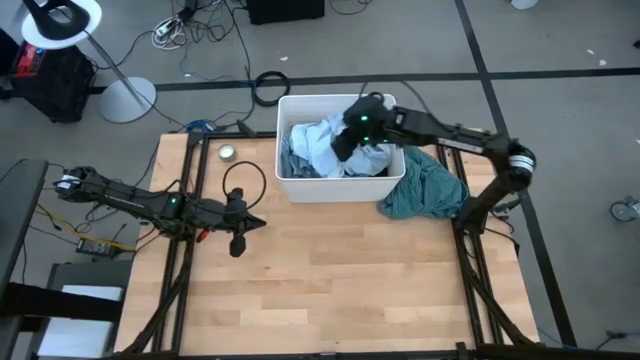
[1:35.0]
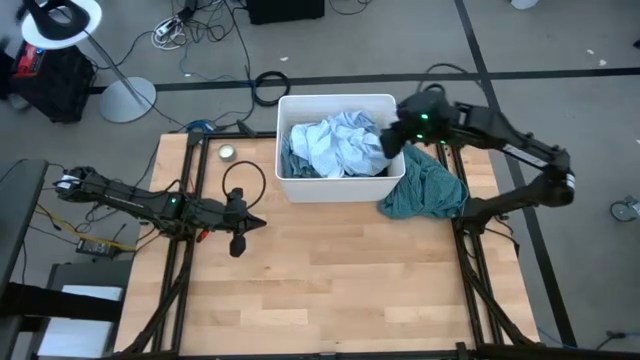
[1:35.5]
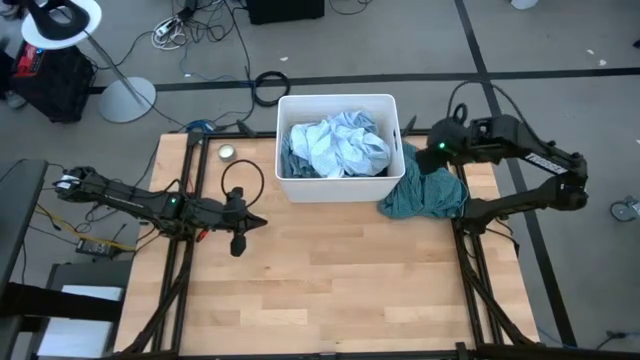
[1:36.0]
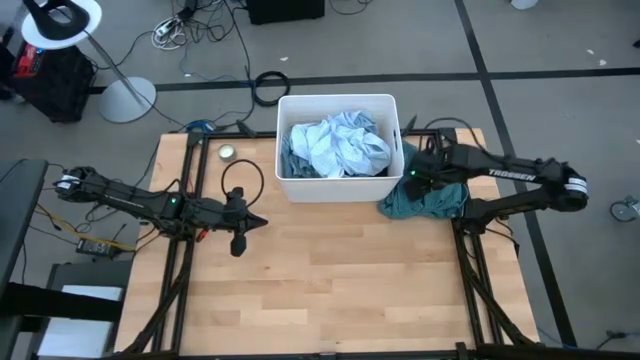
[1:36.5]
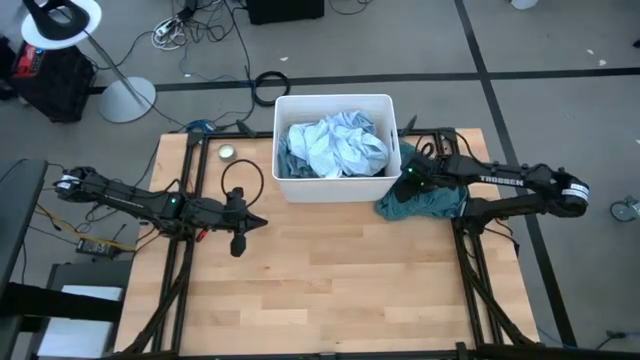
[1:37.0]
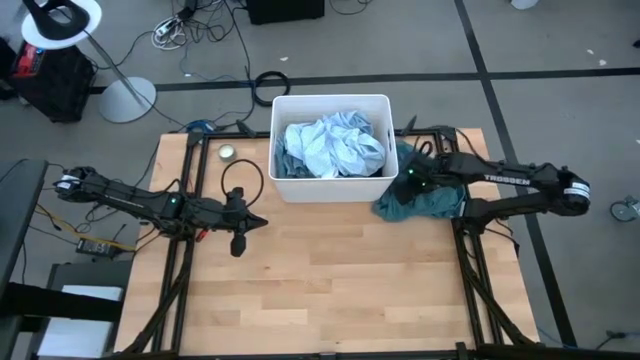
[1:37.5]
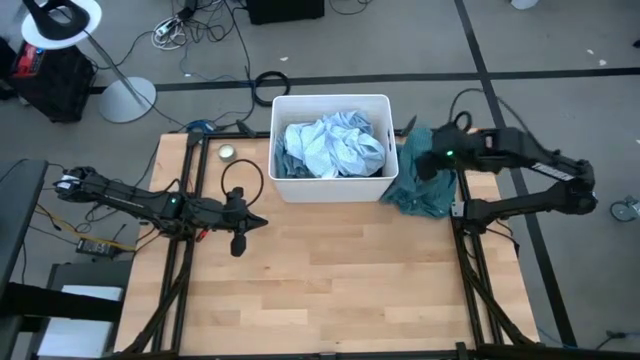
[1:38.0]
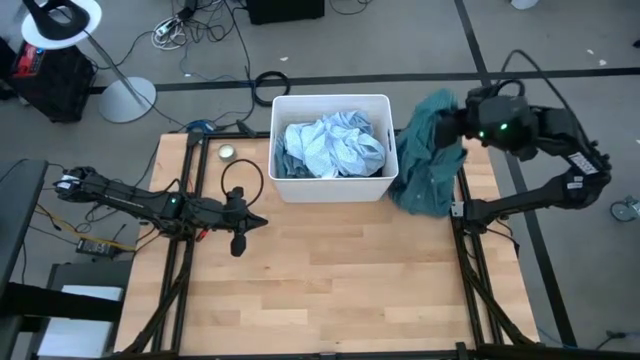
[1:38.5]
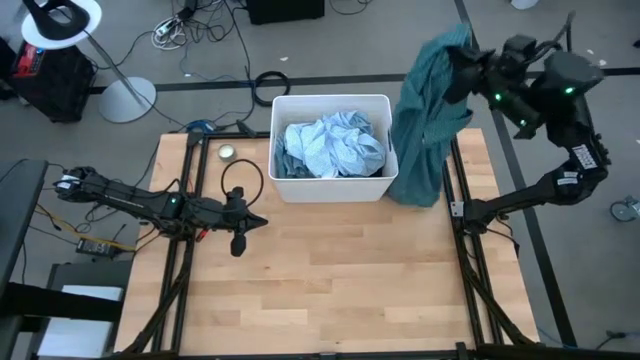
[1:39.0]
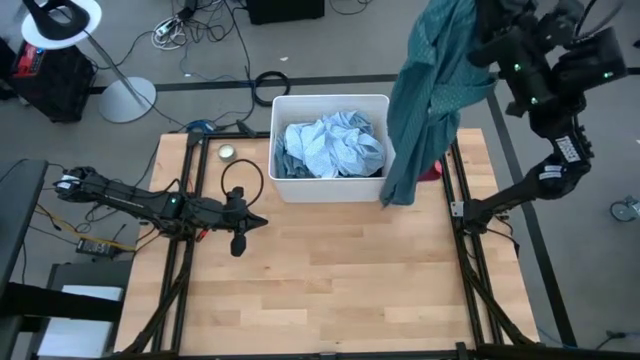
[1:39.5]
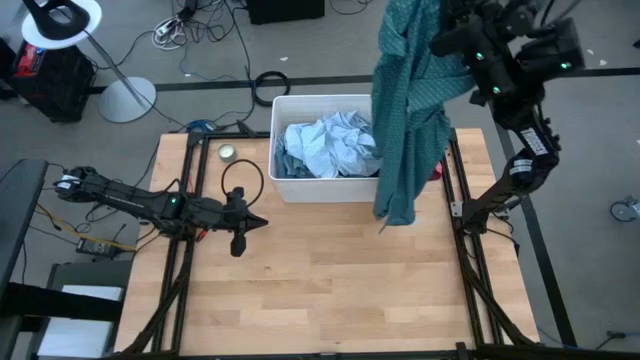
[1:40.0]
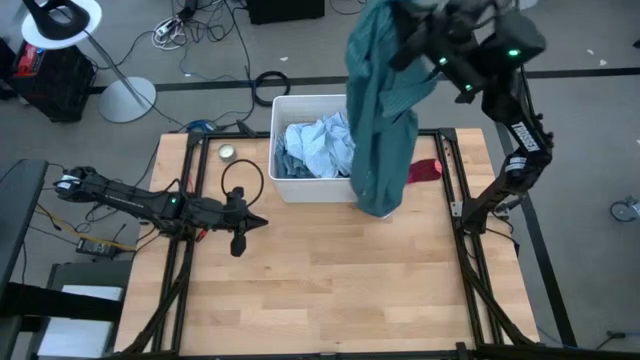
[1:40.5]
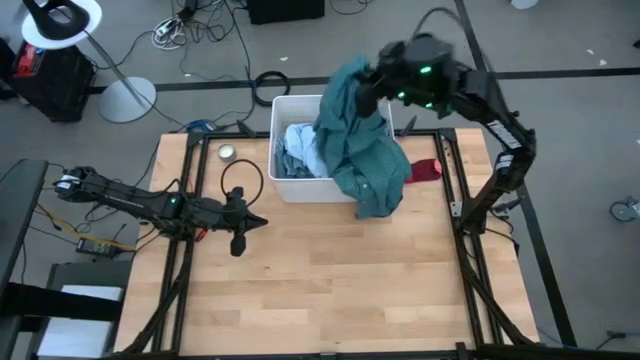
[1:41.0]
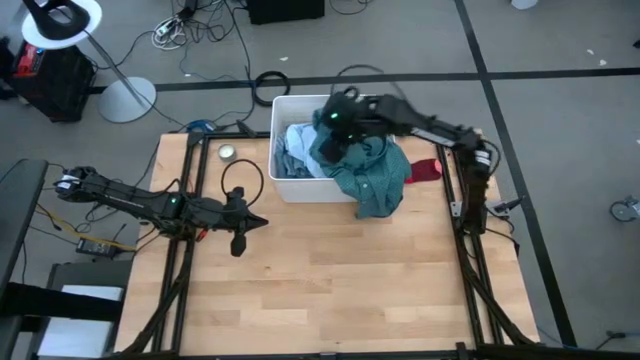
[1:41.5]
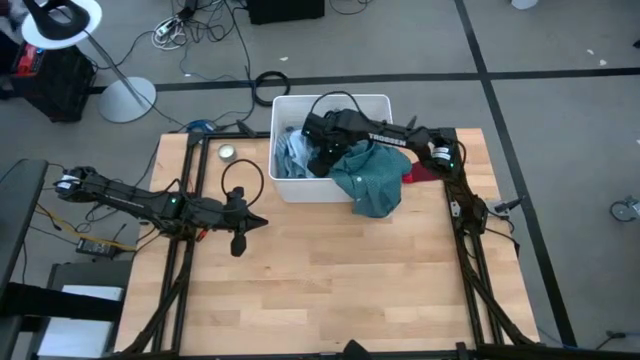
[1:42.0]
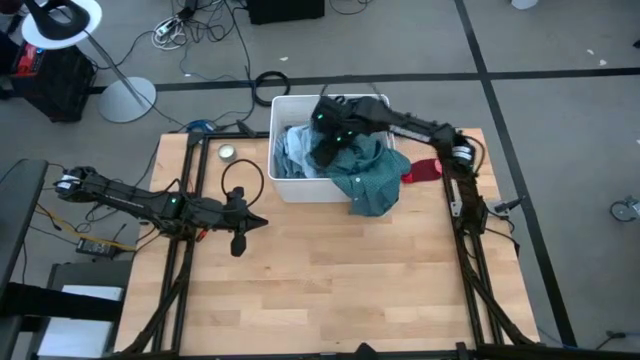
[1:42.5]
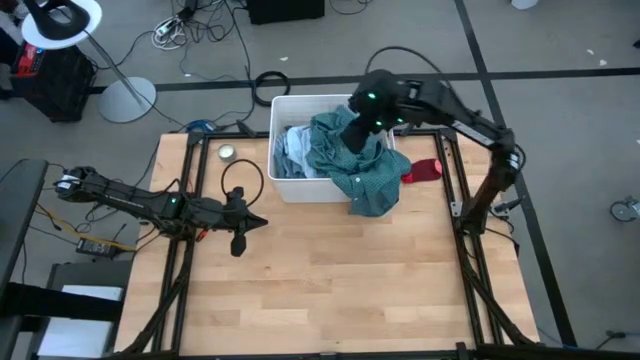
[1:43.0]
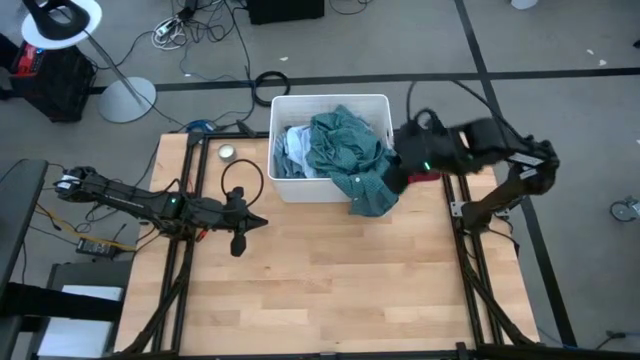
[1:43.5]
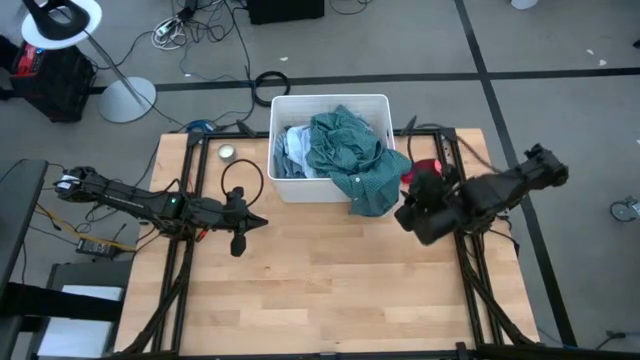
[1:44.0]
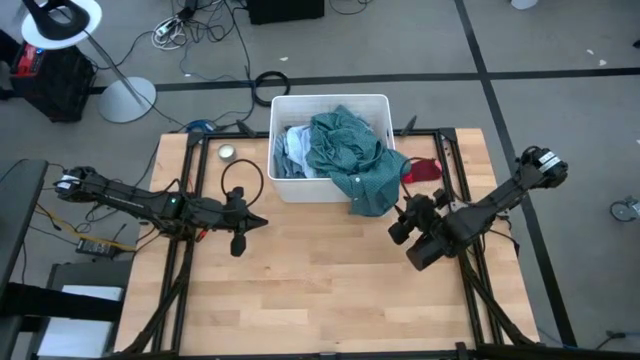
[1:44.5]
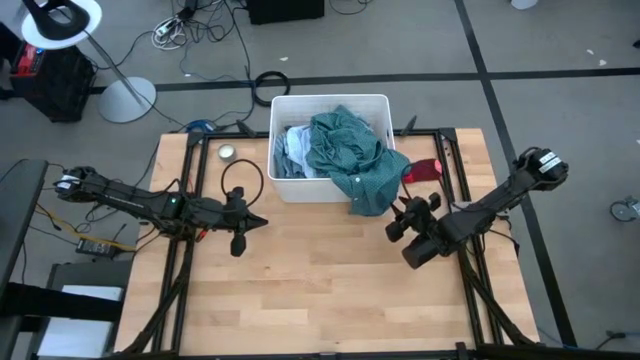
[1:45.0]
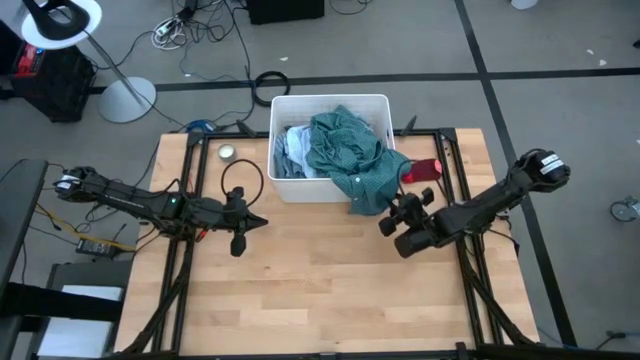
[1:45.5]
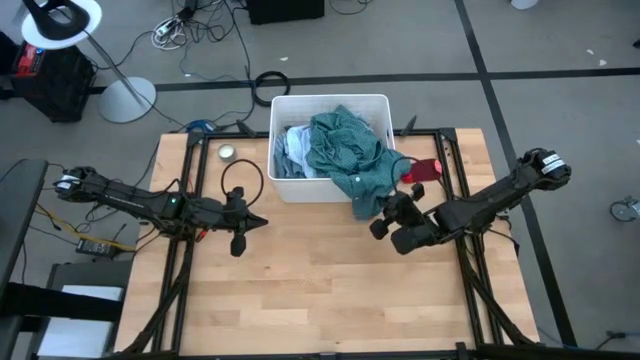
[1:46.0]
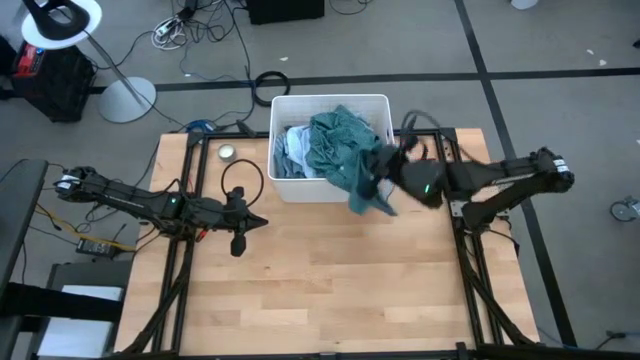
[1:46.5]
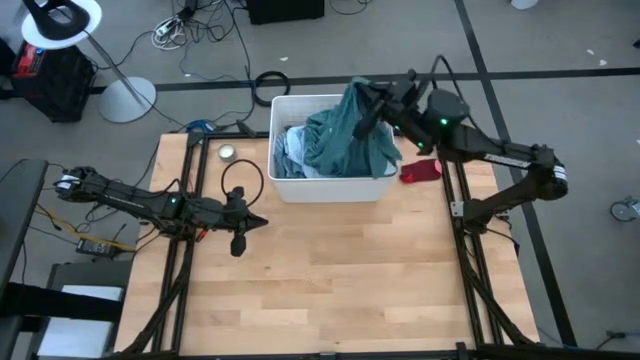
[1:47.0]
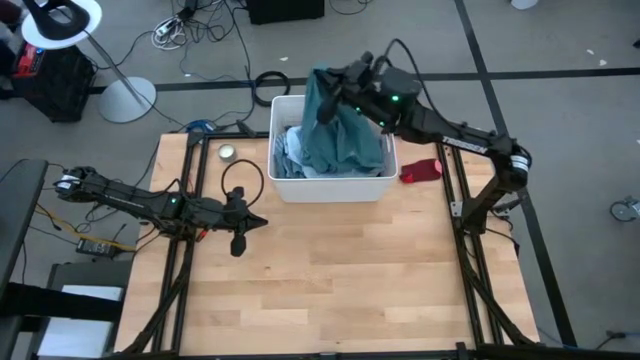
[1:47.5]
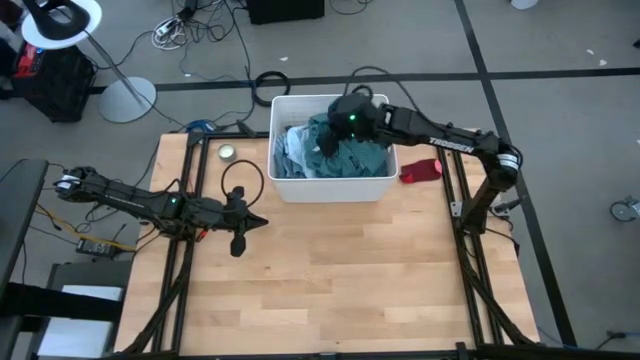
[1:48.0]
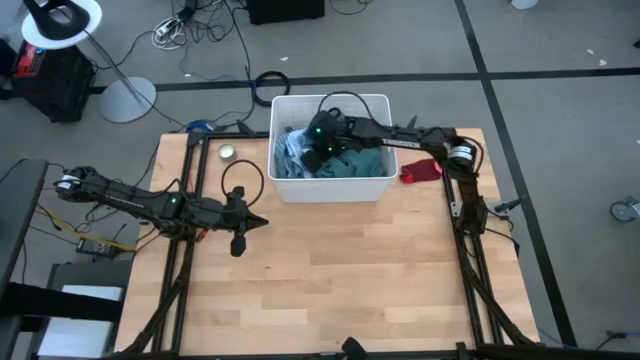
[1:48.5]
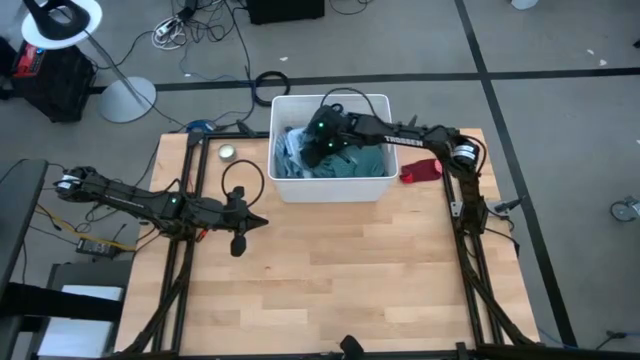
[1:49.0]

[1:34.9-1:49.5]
Task: Sort clothes
Put the gray long sleeve into the laundry bin

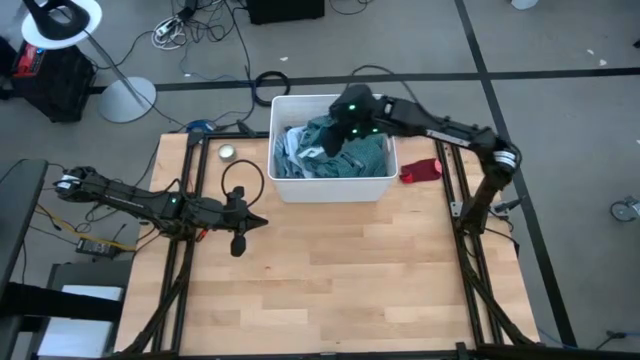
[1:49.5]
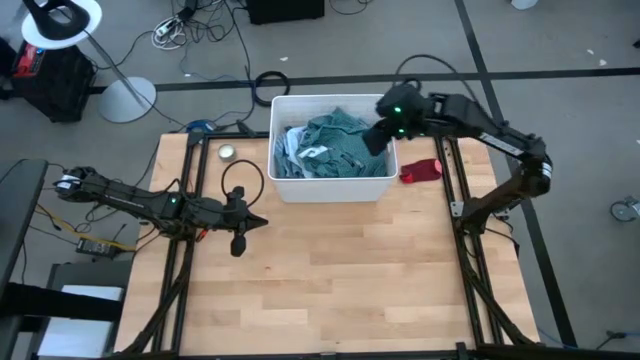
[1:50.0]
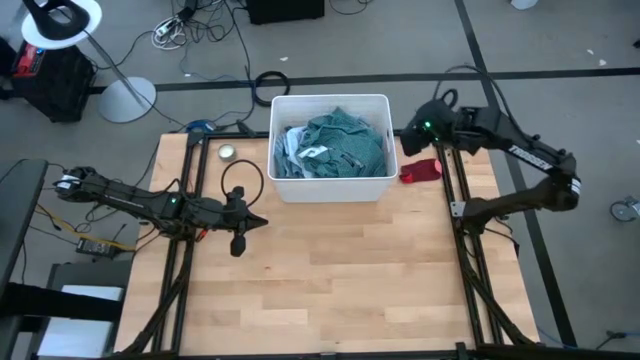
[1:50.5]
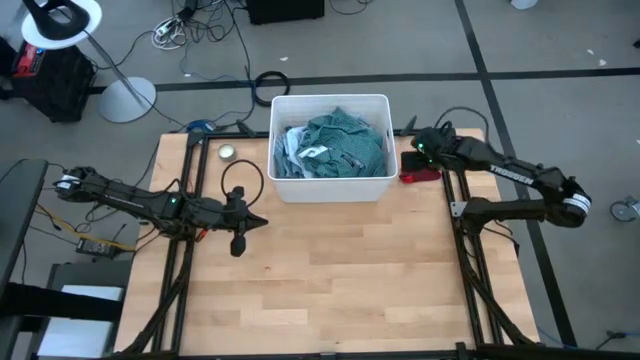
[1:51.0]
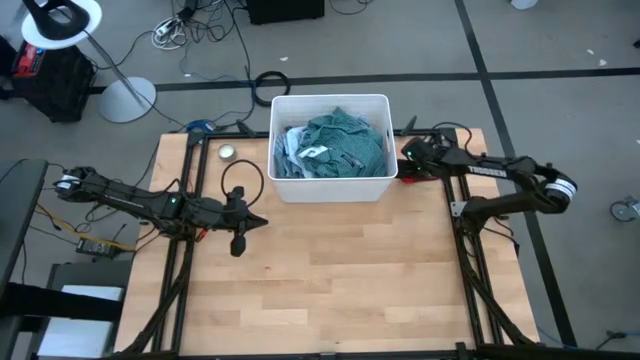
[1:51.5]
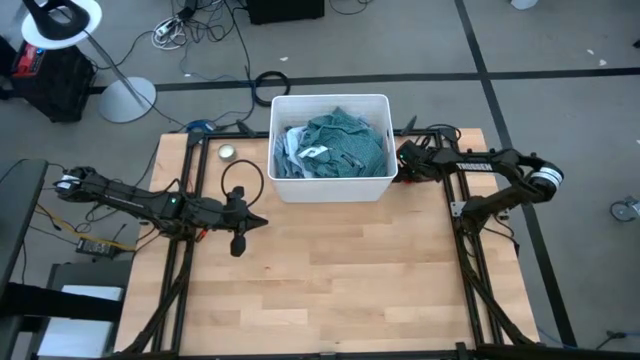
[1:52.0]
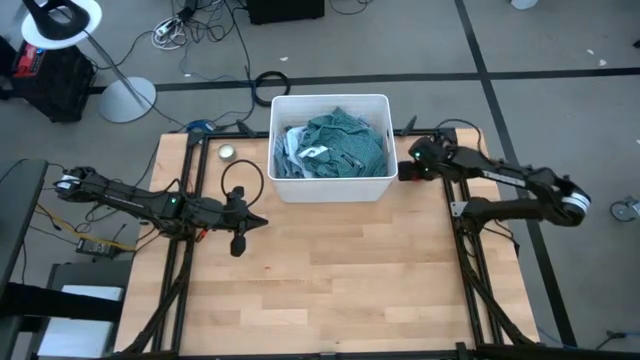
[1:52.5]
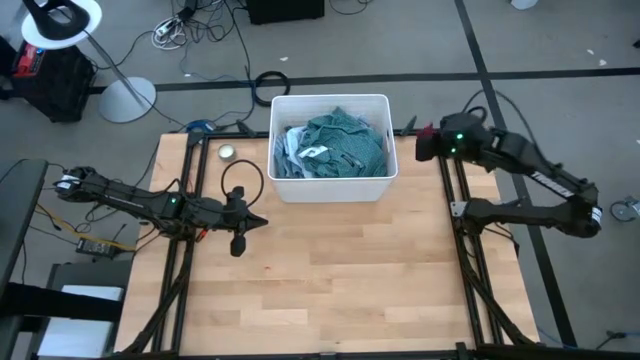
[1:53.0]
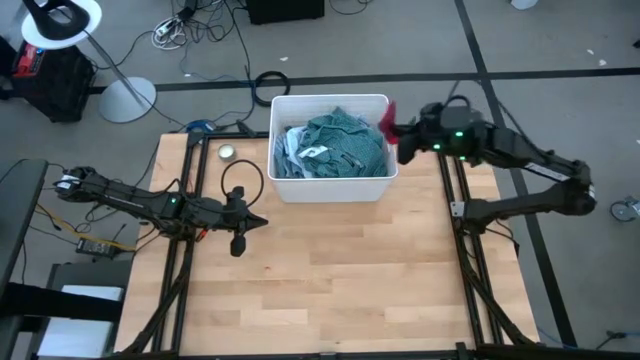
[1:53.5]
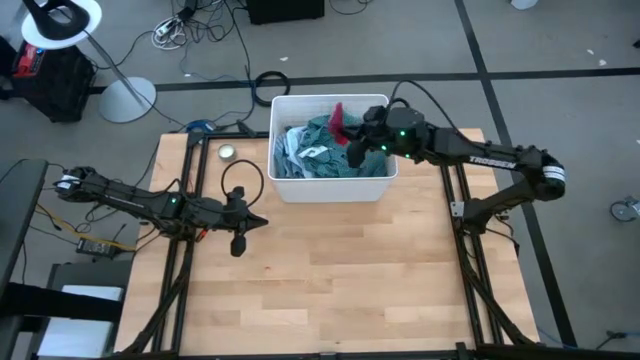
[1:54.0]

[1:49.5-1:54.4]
Put the red sock into the laundry bin

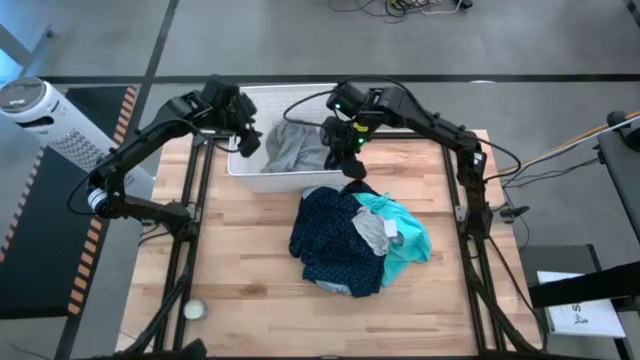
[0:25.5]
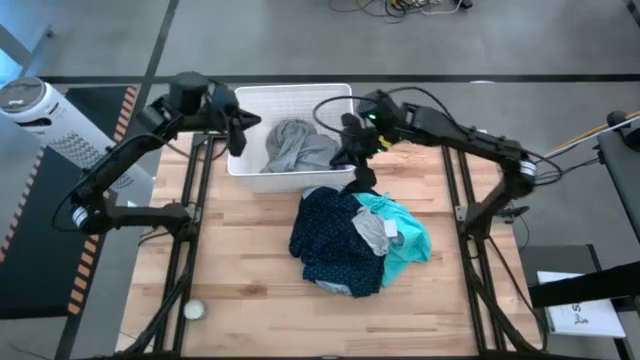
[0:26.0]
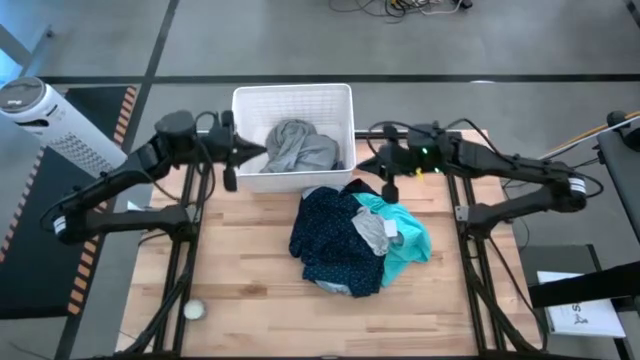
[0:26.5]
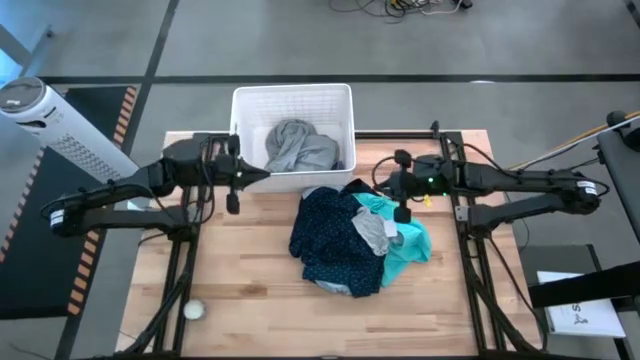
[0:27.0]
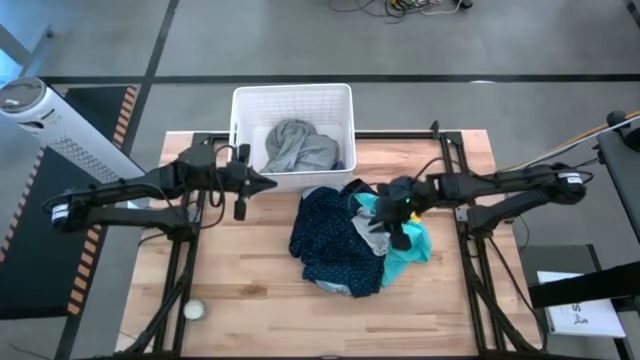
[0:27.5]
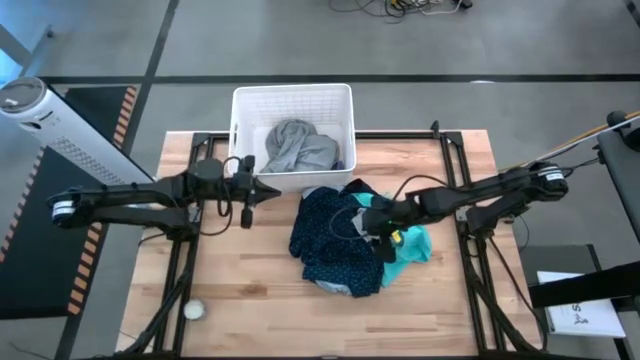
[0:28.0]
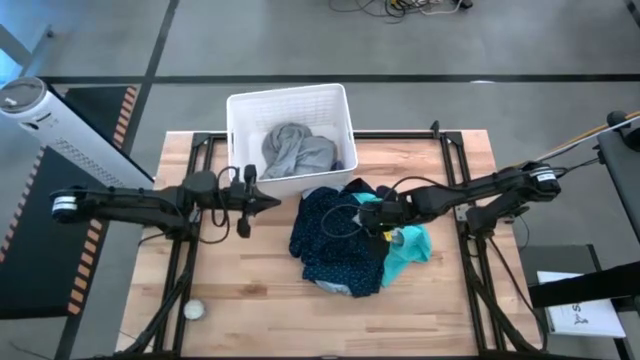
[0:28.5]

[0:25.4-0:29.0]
Task: Sort clothes
Put the gray sock into the white laundry bin
